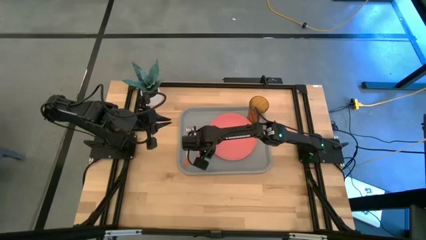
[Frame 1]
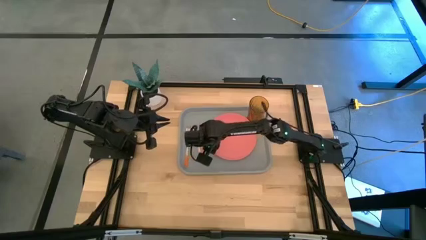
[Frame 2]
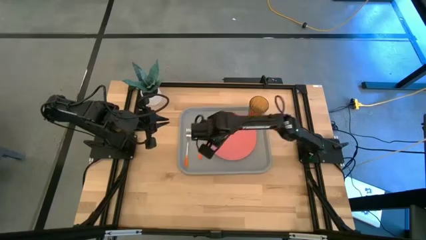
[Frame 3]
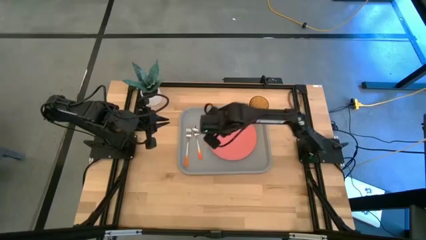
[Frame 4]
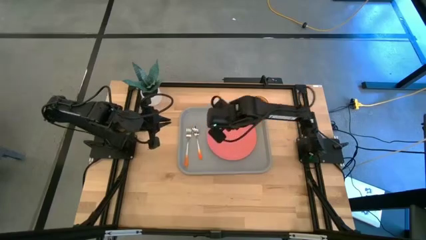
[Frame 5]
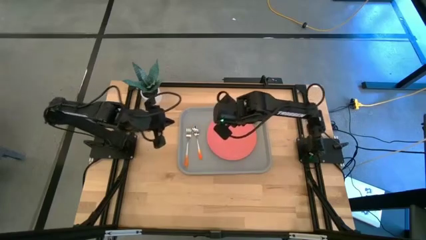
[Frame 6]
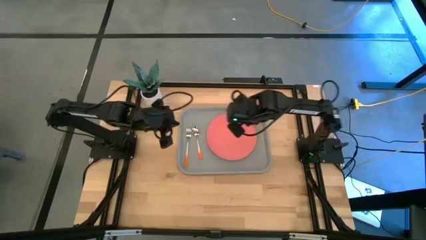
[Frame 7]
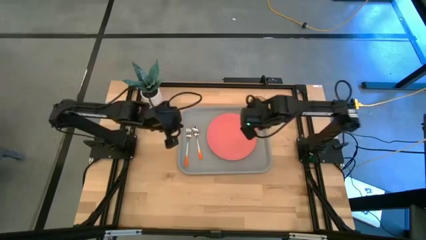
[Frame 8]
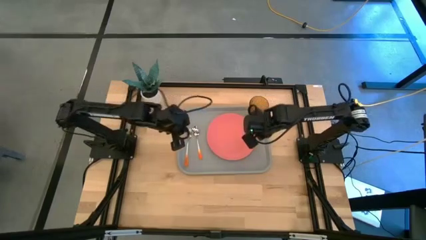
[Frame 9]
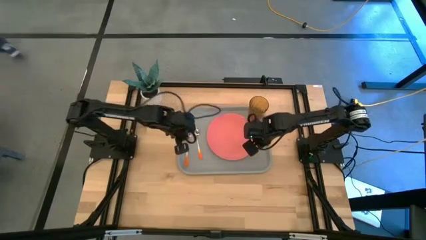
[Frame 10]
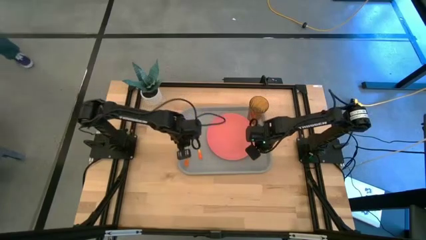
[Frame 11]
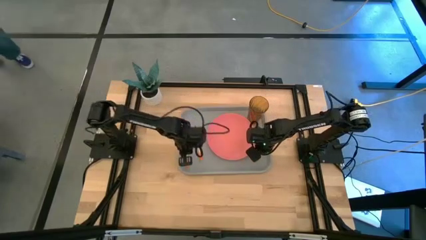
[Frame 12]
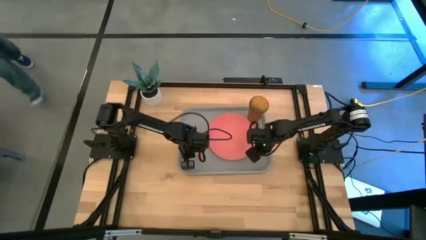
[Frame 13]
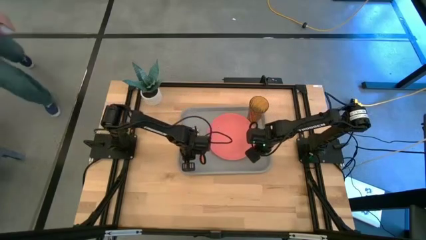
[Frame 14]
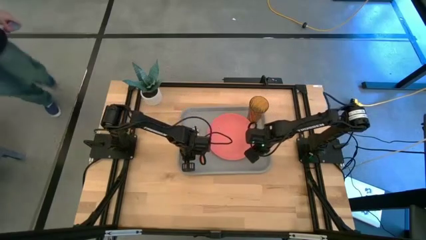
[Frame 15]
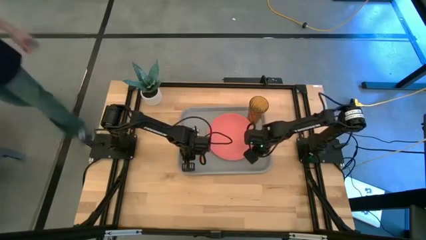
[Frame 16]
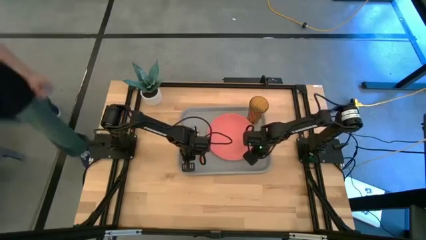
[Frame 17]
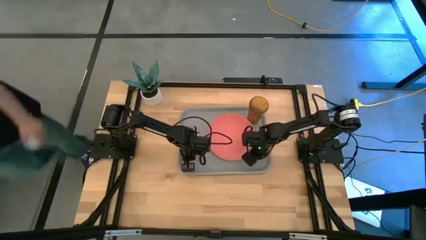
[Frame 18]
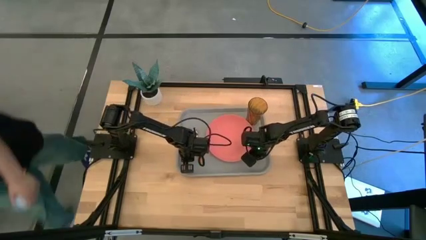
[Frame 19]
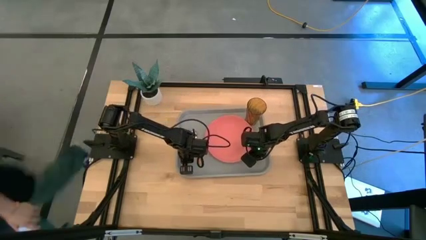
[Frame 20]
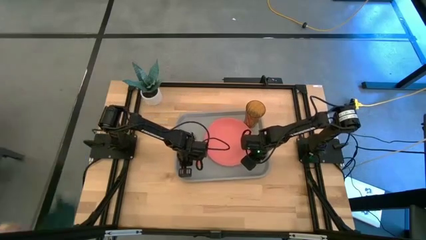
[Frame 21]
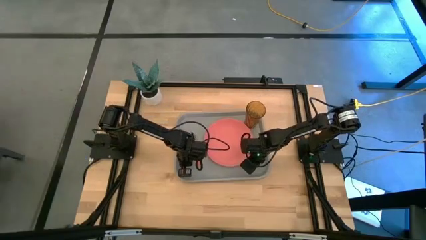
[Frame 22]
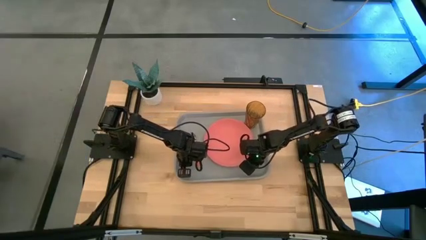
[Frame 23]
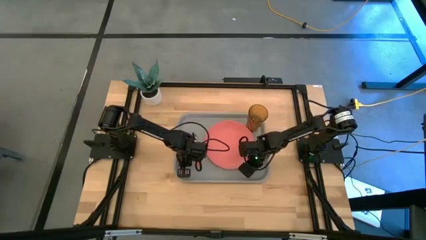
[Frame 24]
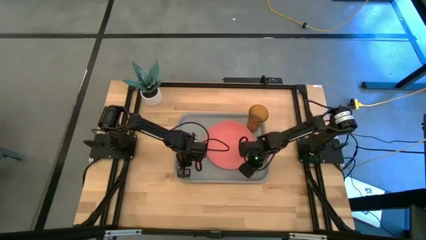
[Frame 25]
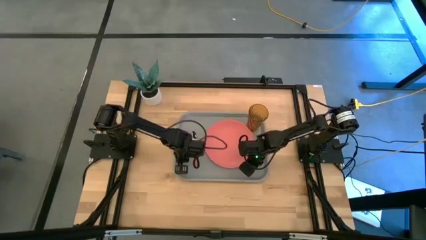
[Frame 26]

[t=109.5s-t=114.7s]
Task: Pick and place plate/cup/fork/spoon on tray
Adjust the gray serving tray

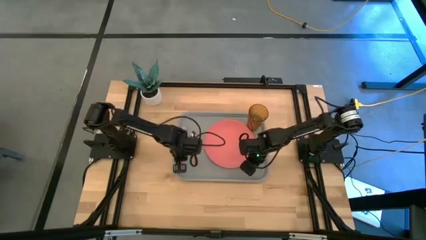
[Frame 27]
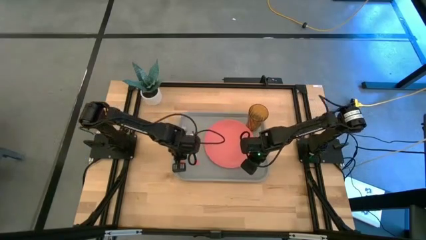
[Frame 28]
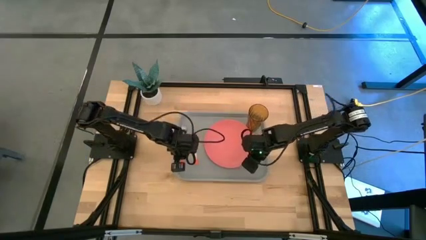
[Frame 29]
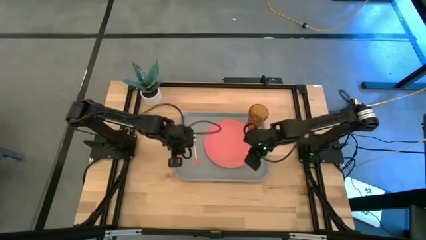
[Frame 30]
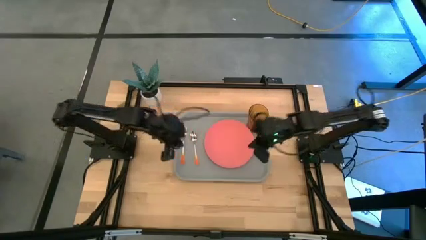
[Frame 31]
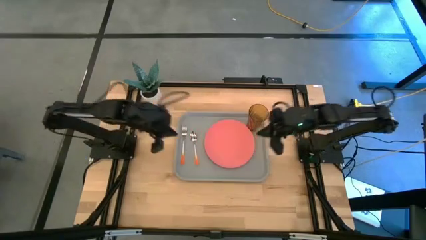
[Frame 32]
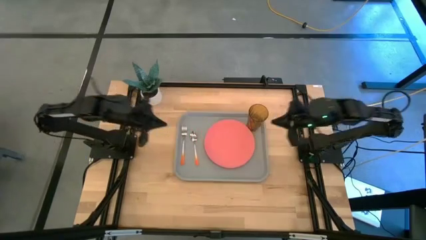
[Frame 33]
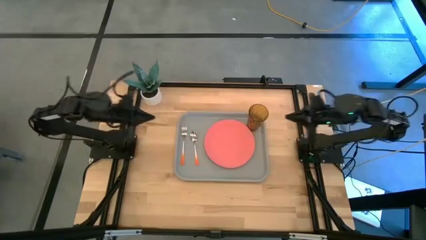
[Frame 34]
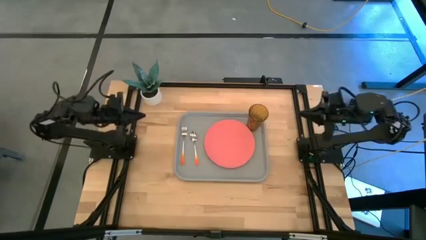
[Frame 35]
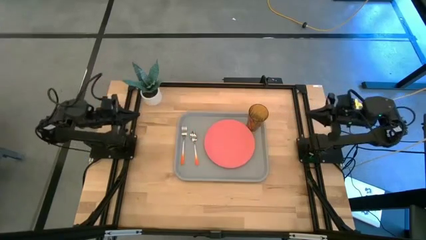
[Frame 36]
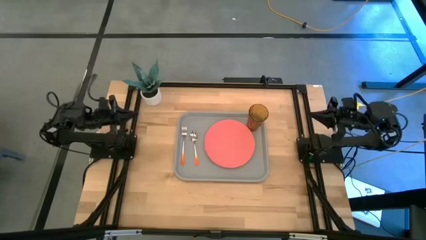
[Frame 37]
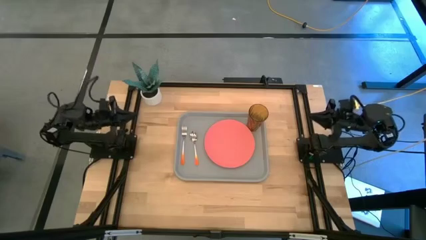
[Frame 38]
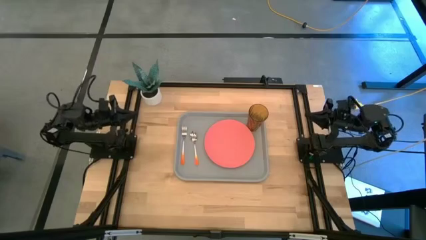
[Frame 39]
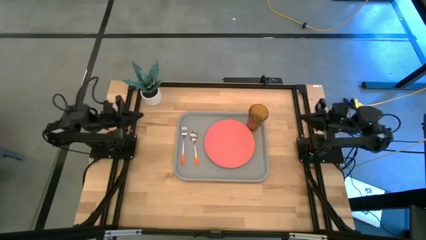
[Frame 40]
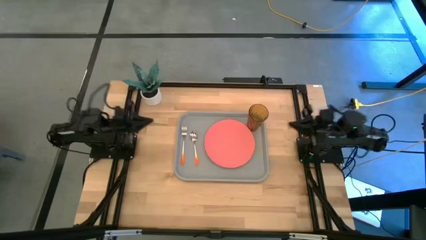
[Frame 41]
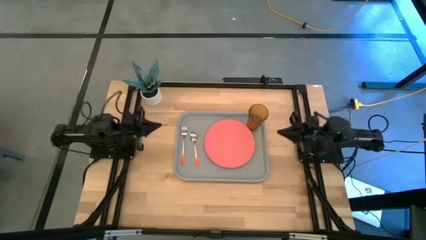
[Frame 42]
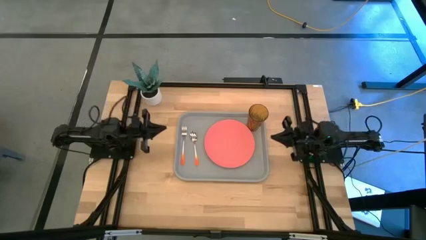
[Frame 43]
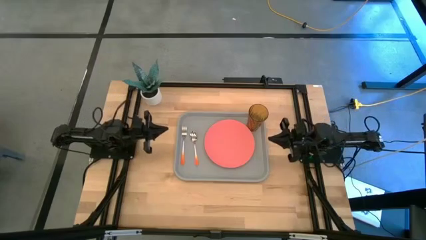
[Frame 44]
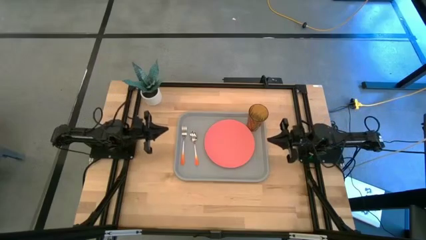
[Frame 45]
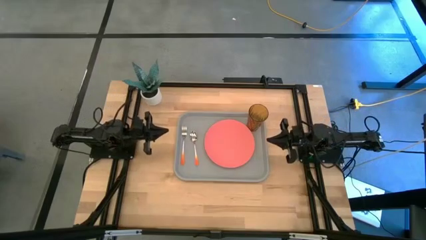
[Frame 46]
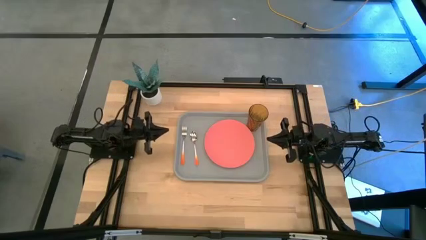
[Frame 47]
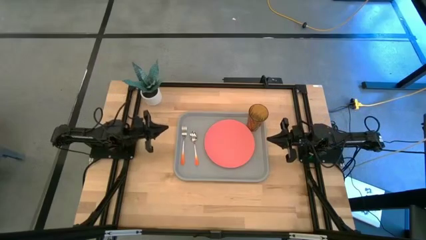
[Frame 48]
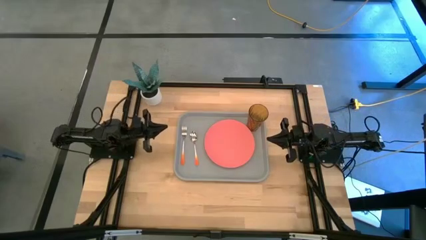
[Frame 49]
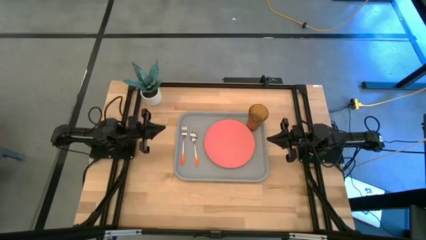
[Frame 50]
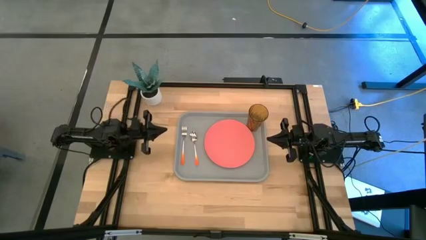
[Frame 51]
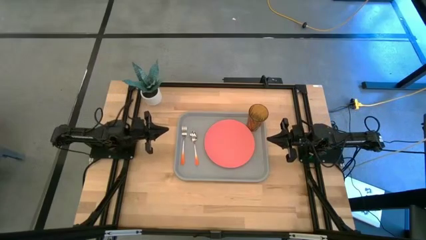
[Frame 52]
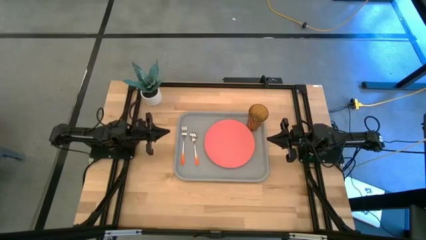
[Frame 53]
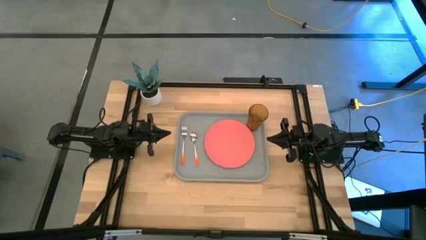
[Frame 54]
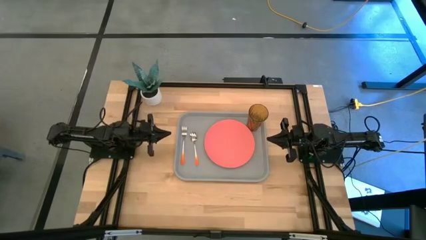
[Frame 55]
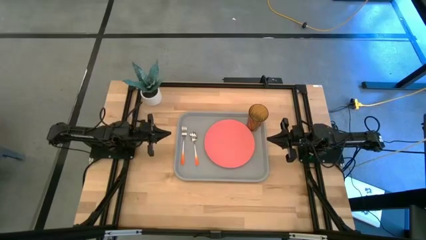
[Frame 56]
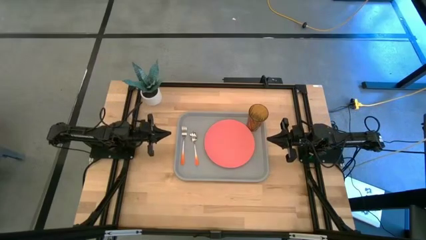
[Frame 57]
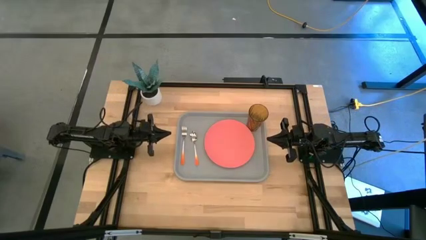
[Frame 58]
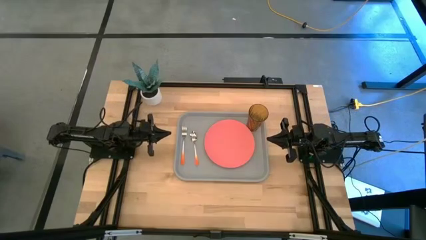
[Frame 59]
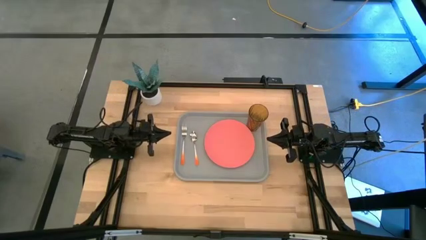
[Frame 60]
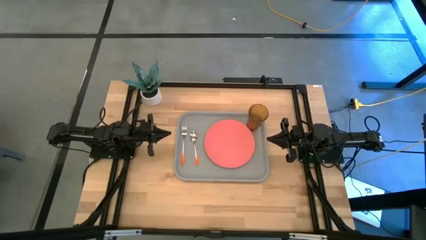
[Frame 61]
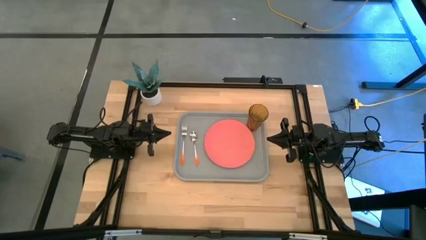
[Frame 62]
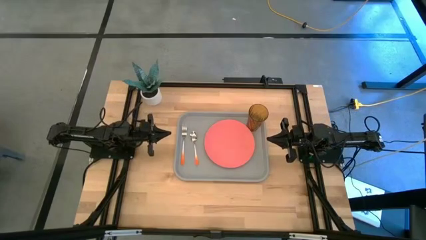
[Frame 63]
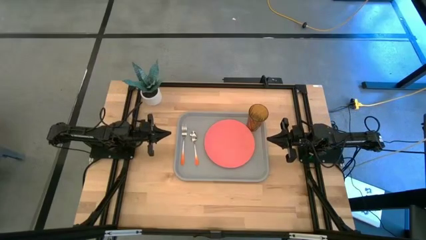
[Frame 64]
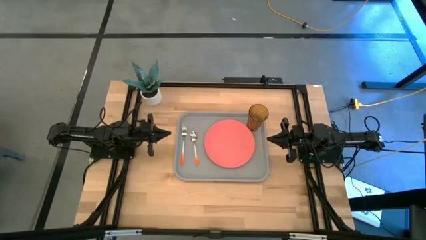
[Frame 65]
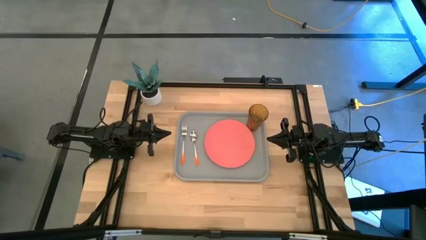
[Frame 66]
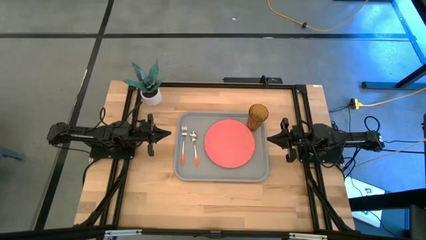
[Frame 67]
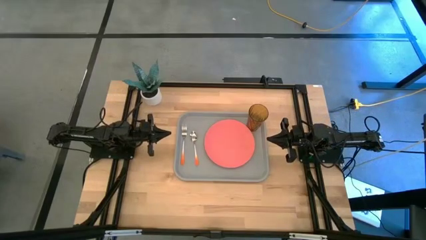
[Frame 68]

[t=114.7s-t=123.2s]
Return to Home Position
